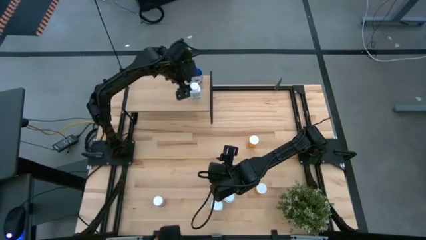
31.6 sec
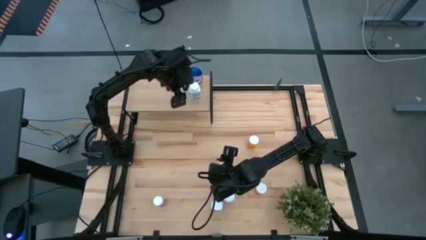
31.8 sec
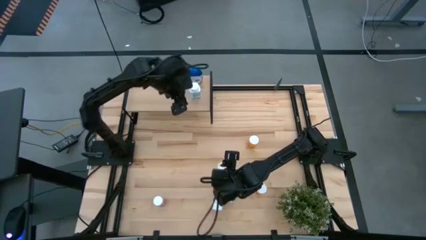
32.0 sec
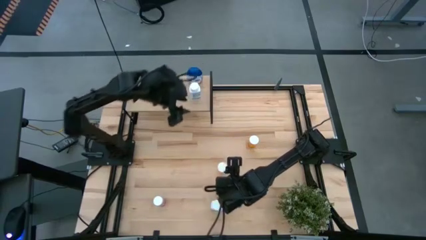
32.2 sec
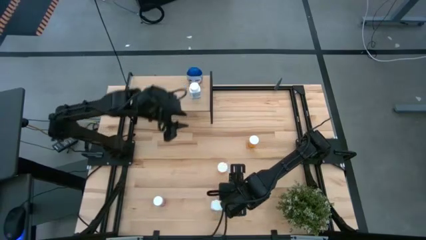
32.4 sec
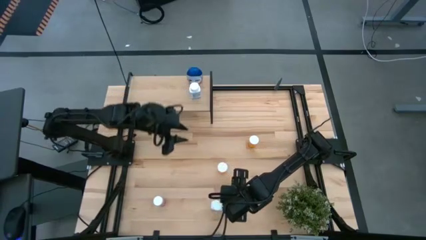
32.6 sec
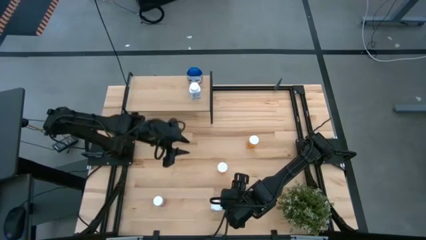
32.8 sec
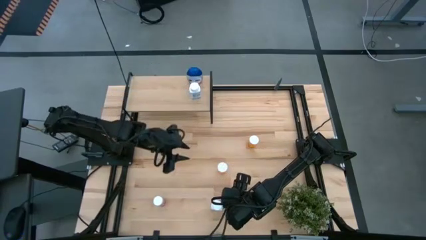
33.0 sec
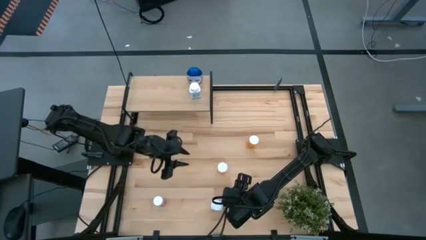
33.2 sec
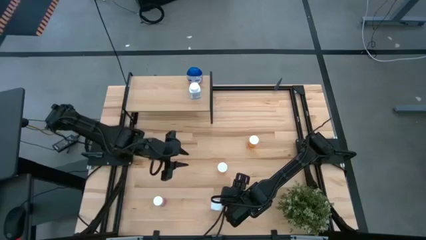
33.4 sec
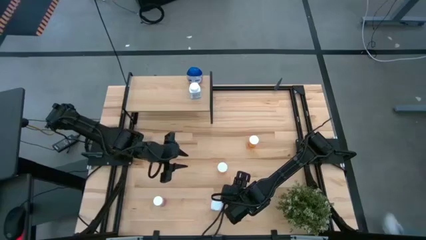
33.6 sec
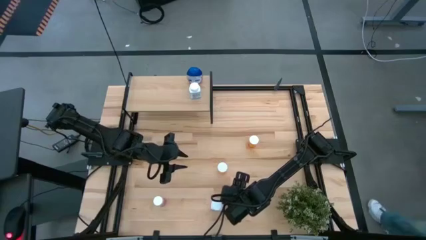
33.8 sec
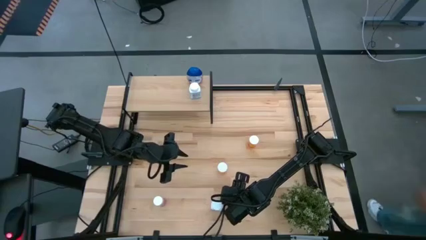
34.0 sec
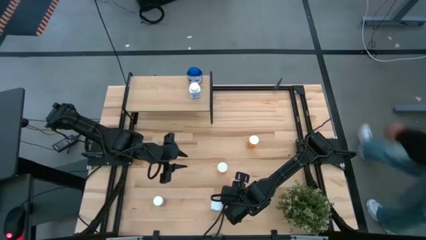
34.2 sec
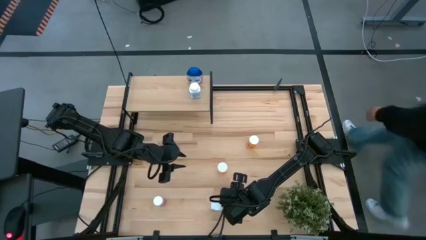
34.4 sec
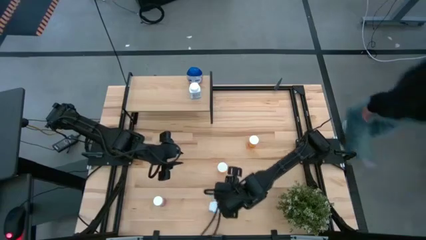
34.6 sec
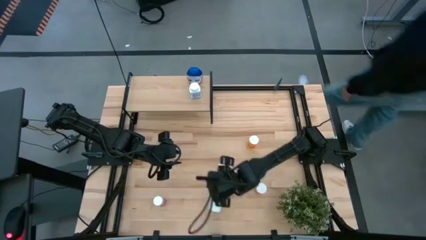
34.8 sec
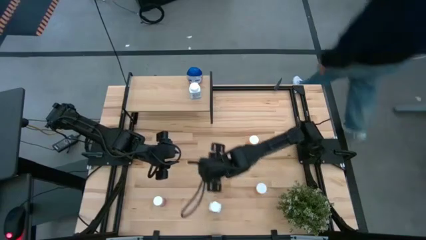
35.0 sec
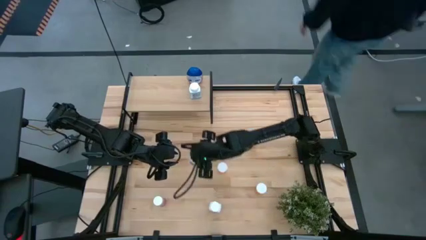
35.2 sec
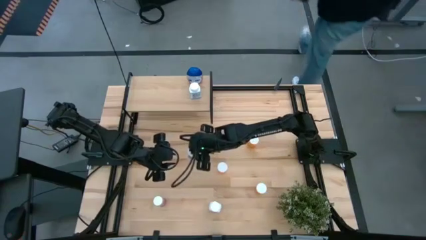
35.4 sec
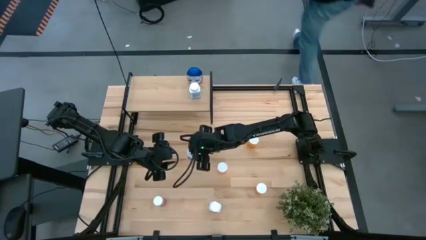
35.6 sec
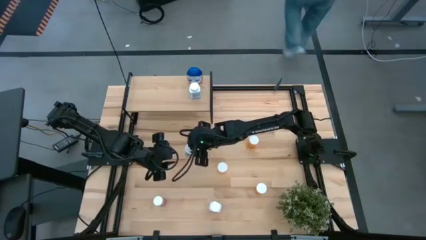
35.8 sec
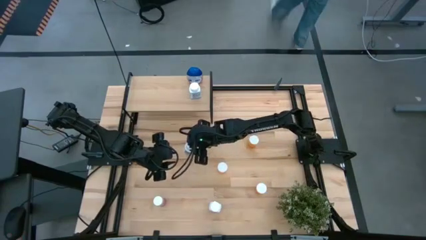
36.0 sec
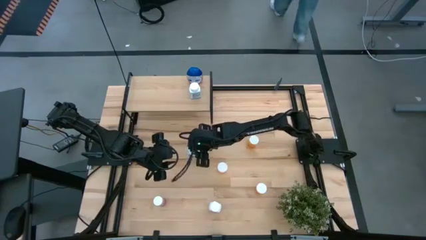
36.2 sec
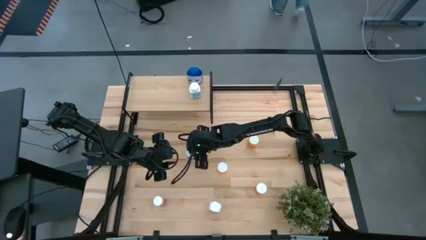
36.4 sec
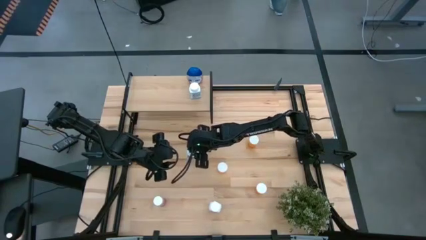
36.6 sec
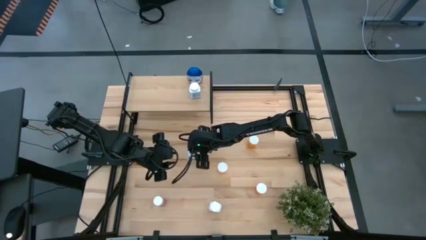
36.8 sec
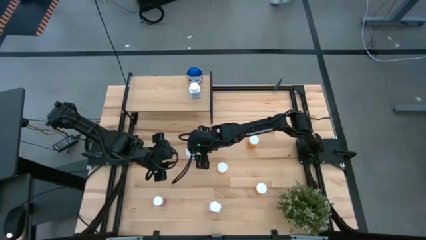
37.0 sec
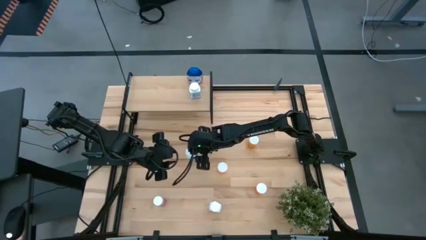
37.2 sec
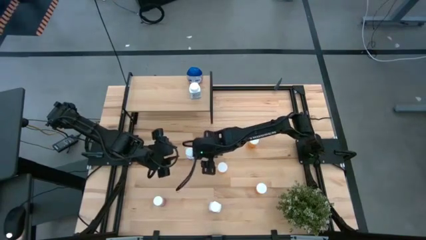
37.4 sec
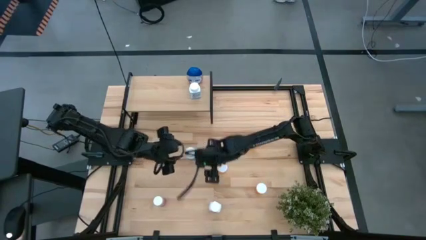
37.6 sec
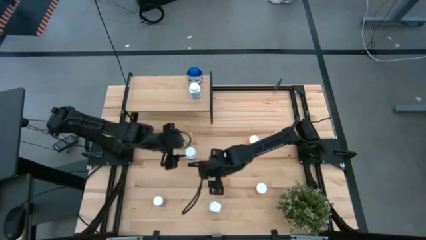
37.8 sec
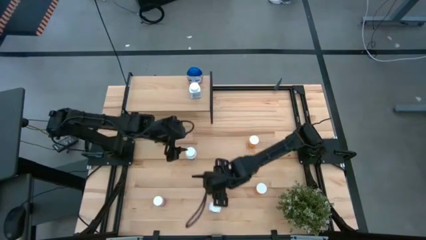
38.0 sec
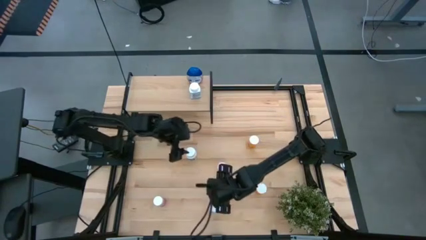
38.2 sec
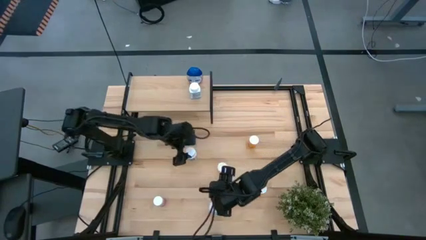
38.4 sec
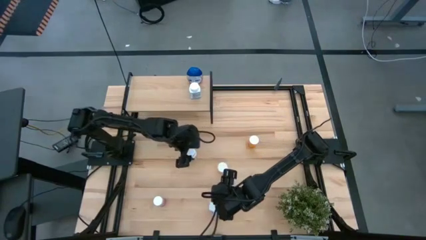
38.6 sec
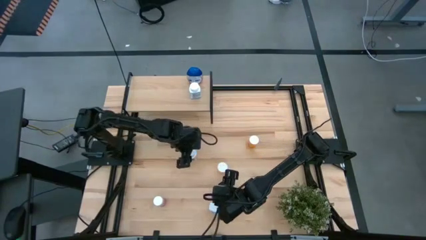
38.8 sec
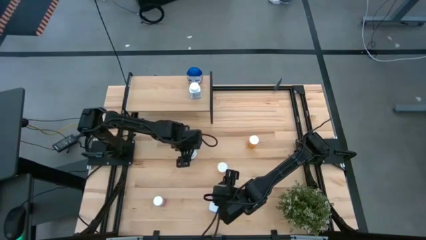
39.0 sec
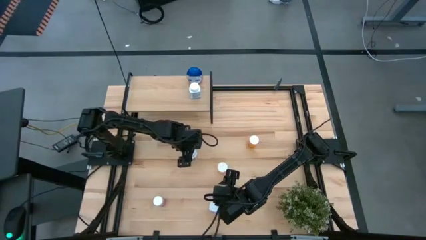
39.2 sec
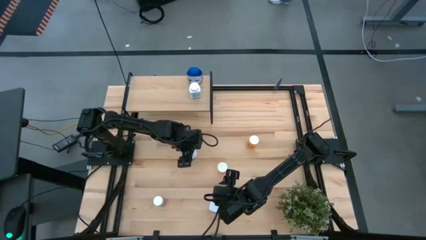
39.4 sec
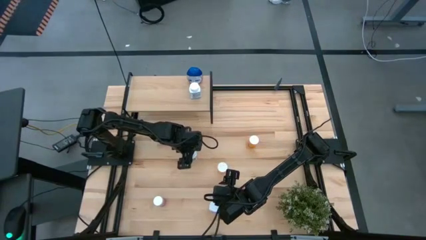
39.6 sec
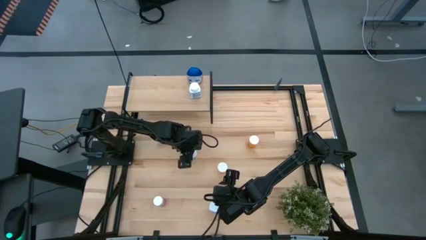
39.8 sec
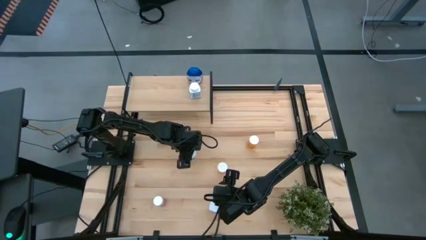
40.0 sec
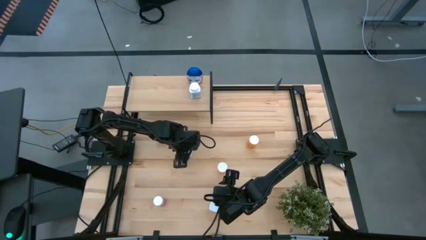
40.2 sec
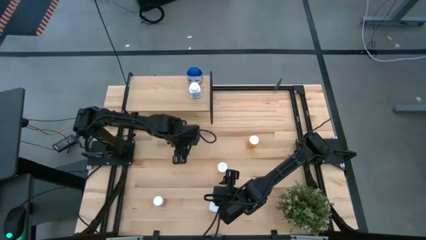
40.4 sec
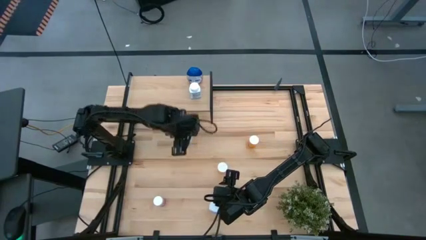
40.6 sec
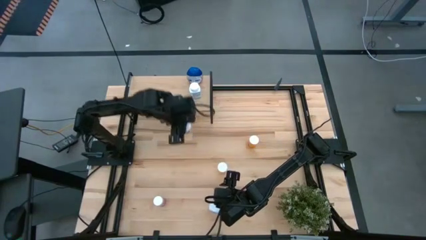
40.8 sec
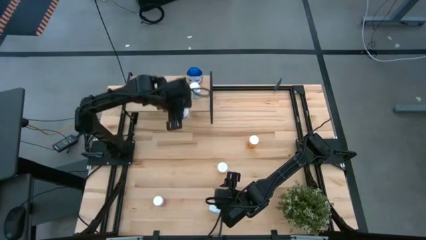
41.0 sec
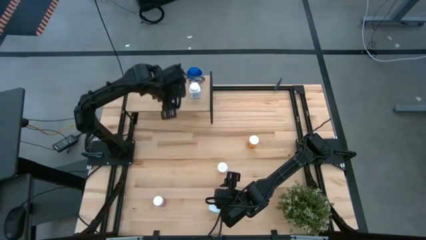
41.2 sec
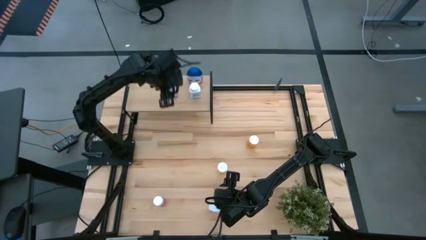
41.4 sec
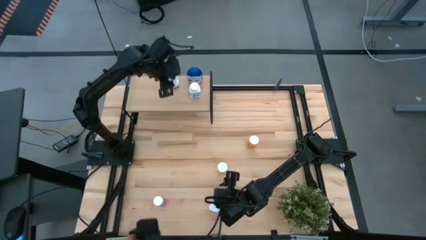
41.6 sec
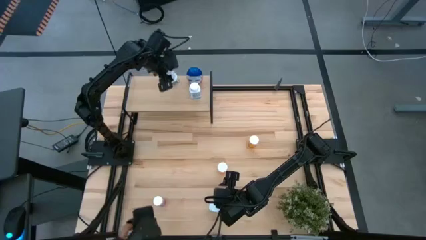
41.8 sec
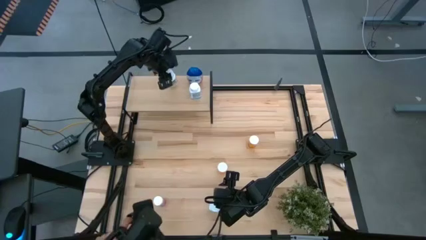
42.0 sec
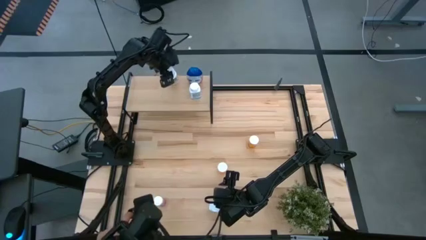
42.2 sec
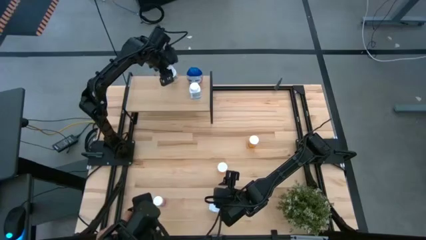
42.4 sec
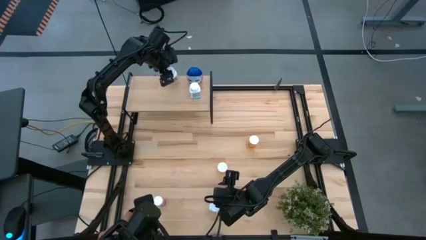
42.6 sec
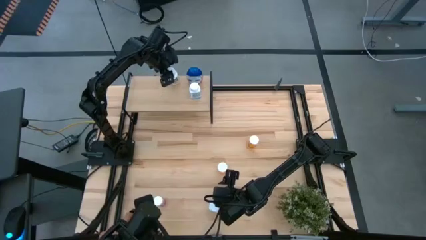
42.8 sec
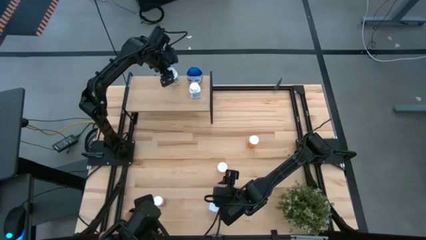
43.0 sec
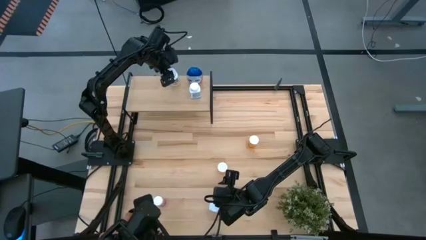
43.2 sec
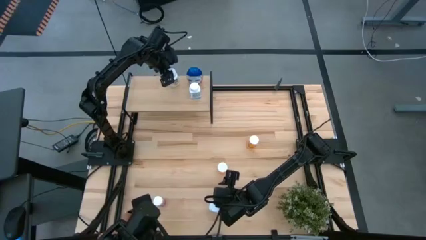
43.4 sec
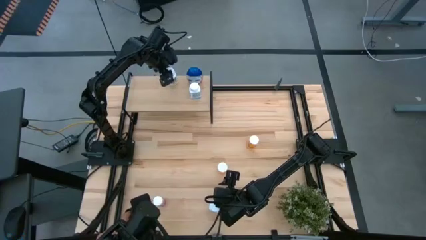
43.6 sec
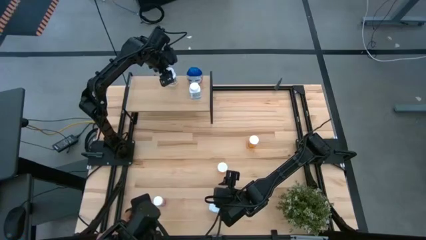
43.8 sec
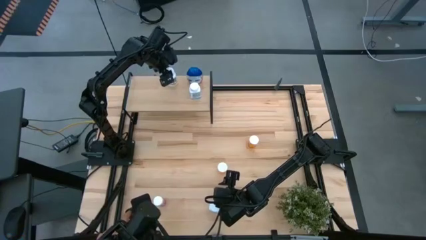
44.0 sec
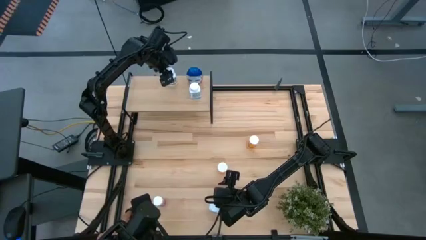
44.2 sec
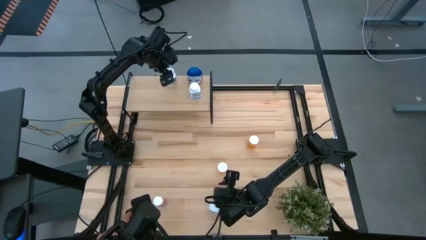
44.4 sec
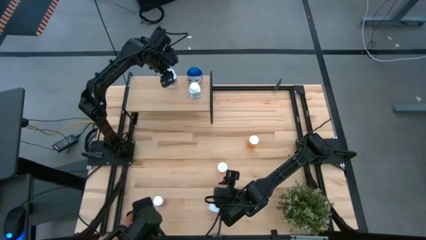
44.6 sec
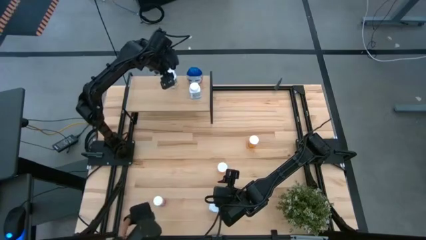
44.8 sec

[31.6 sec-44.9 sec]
Task: Pick and place medicine bottles onto shelf by color
Put the white pill bottle on the shelf
